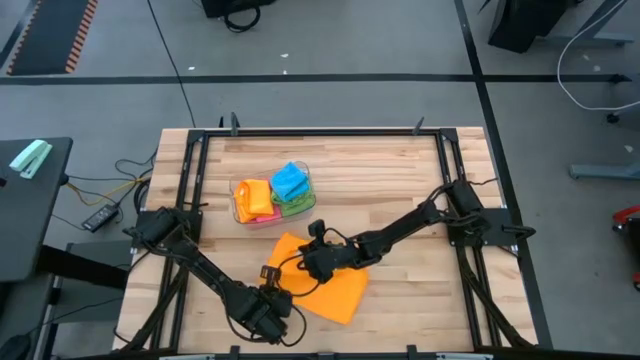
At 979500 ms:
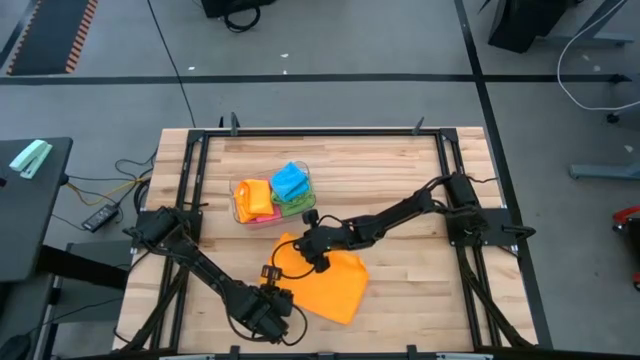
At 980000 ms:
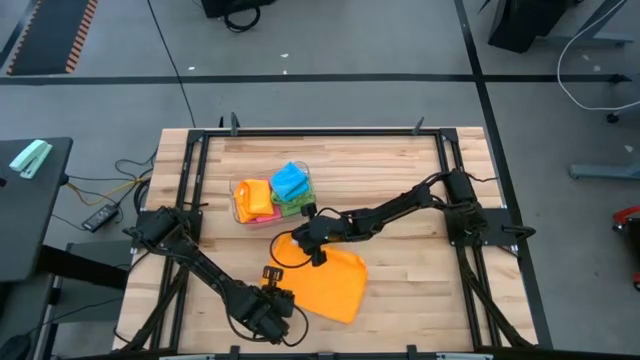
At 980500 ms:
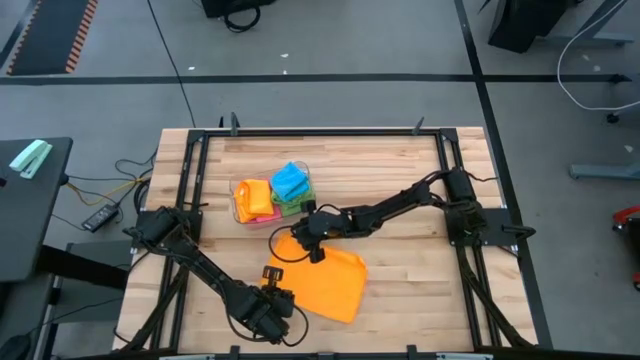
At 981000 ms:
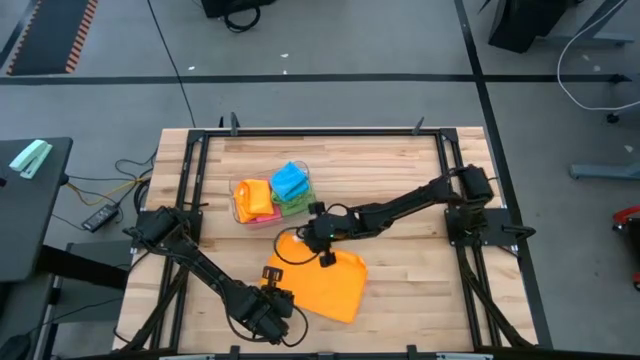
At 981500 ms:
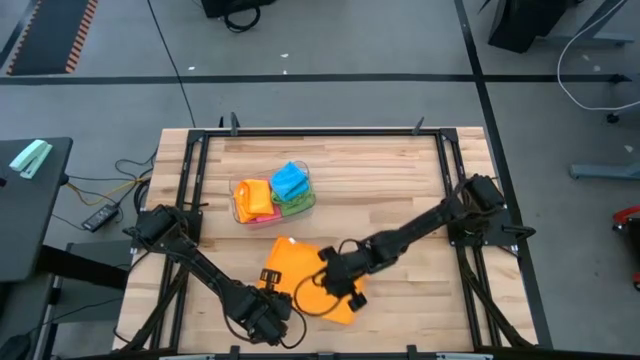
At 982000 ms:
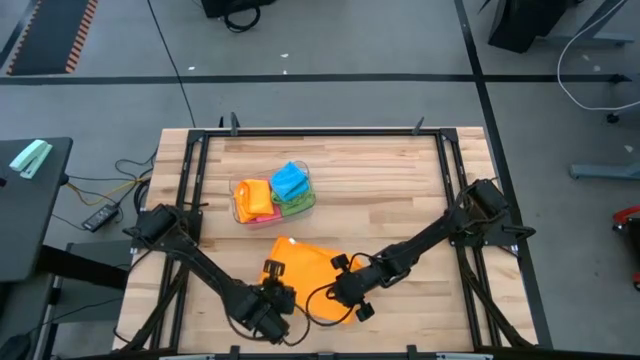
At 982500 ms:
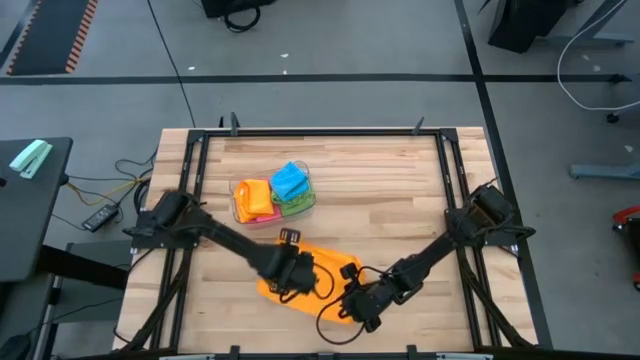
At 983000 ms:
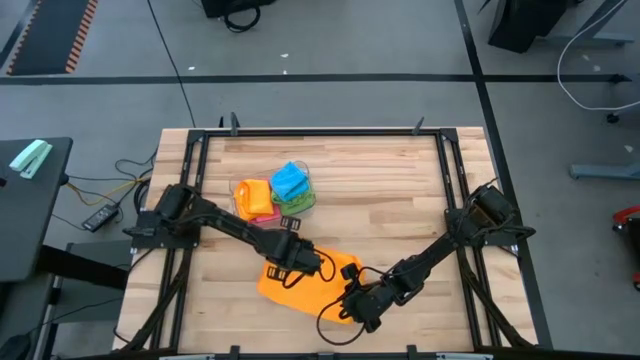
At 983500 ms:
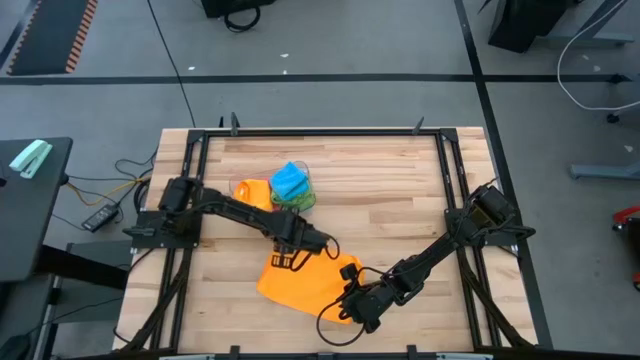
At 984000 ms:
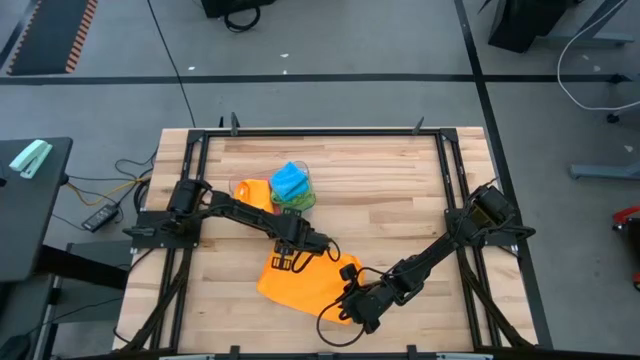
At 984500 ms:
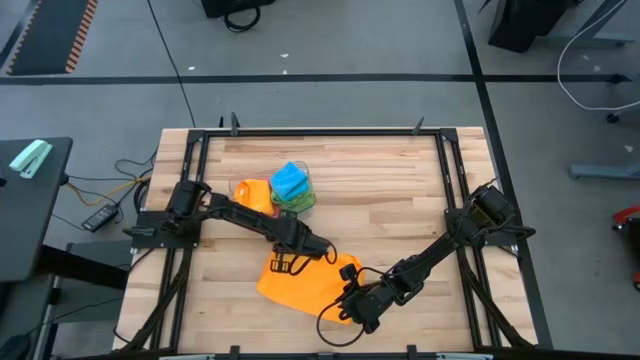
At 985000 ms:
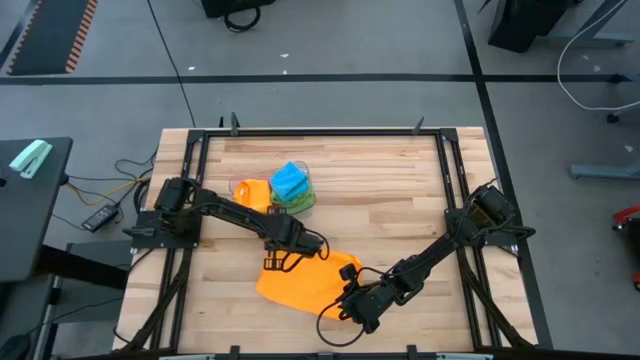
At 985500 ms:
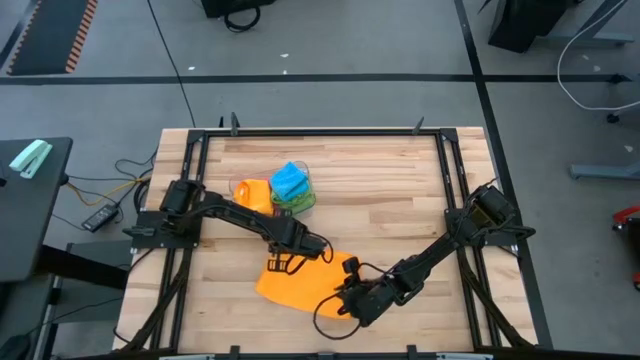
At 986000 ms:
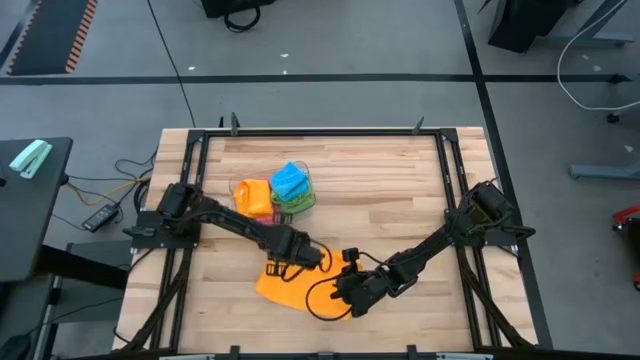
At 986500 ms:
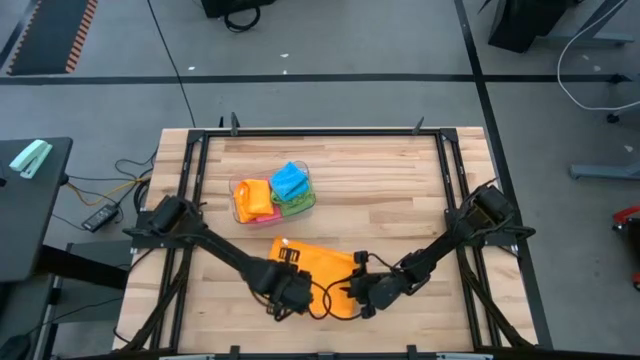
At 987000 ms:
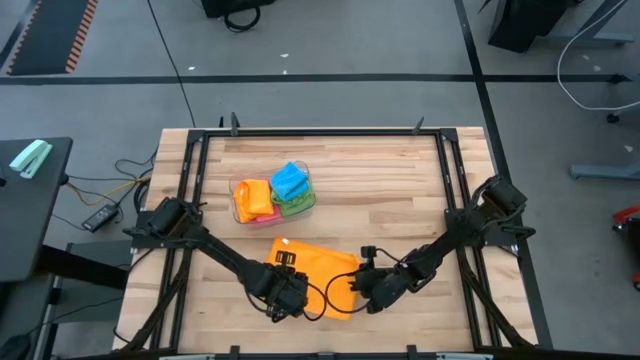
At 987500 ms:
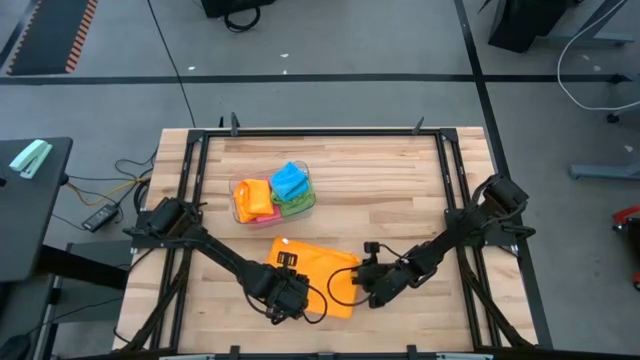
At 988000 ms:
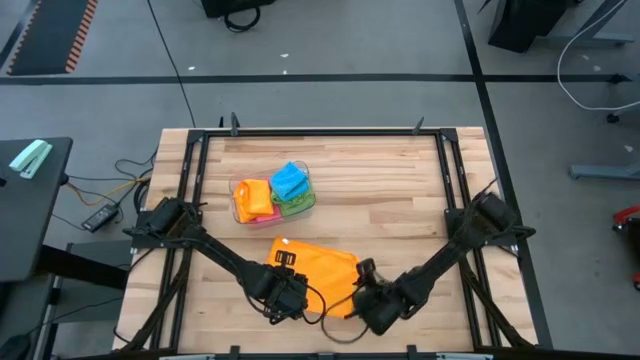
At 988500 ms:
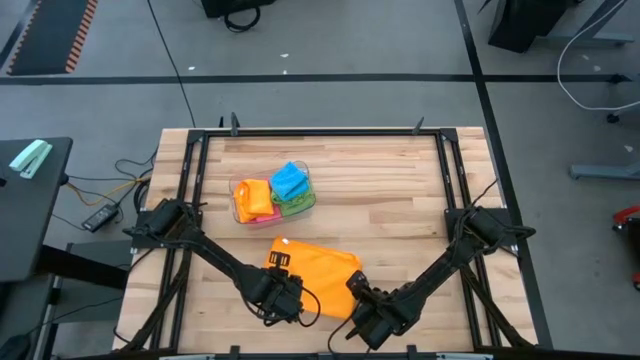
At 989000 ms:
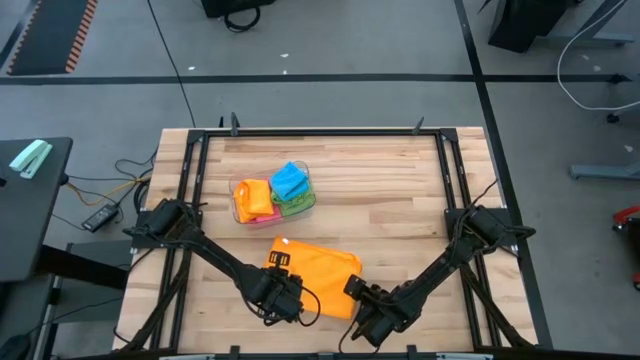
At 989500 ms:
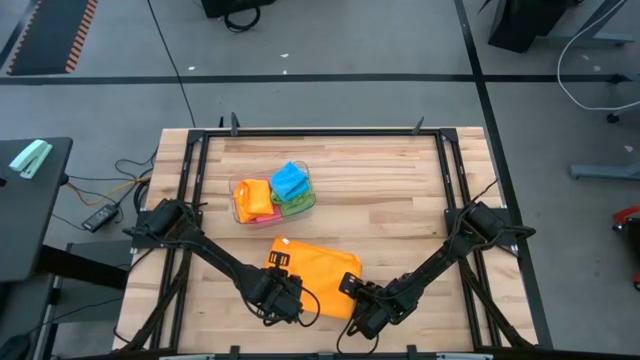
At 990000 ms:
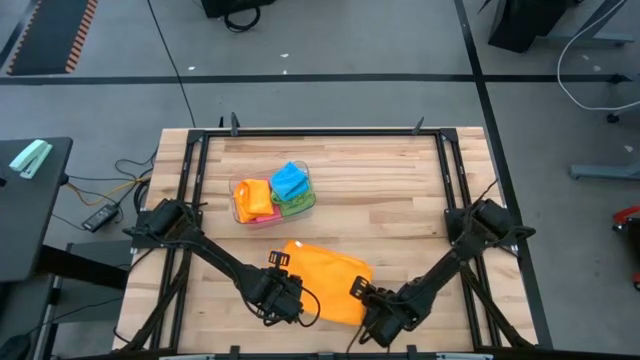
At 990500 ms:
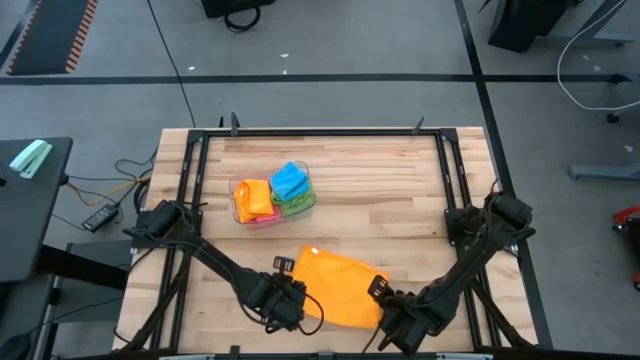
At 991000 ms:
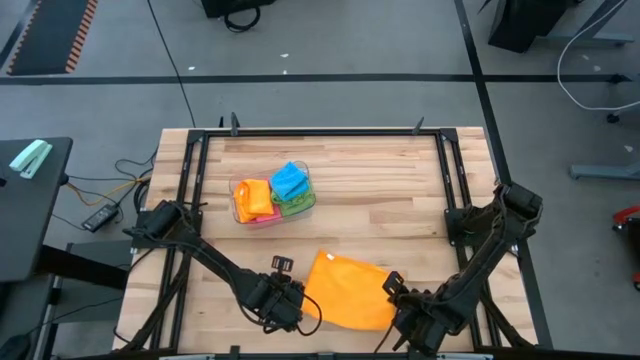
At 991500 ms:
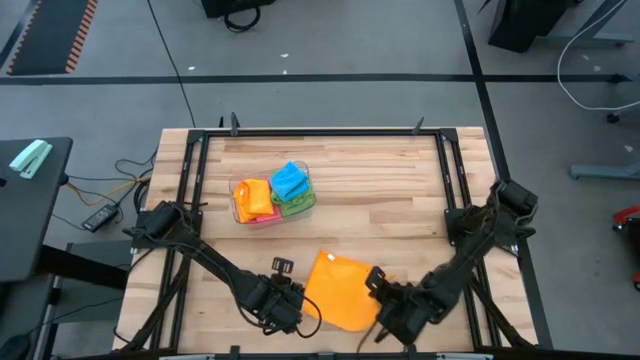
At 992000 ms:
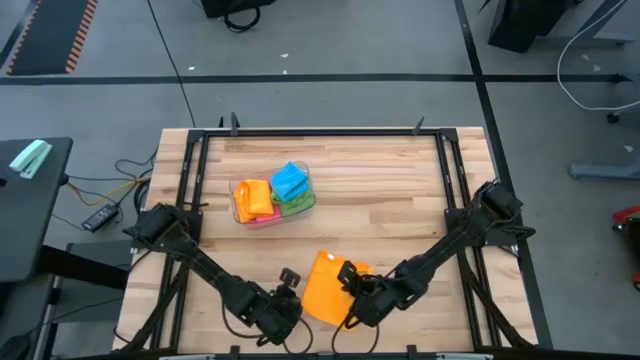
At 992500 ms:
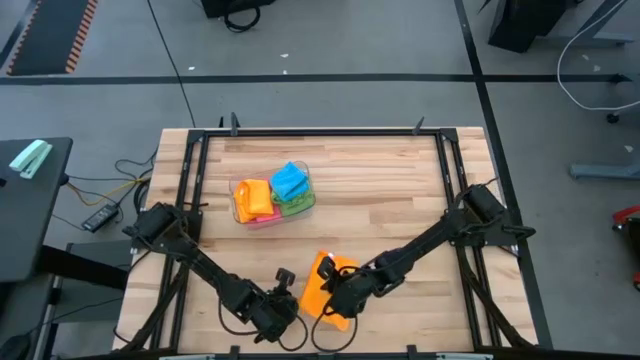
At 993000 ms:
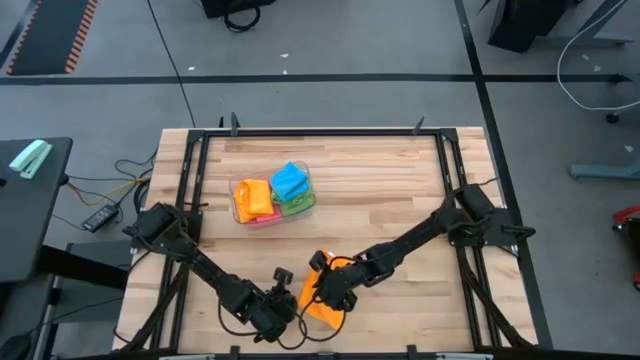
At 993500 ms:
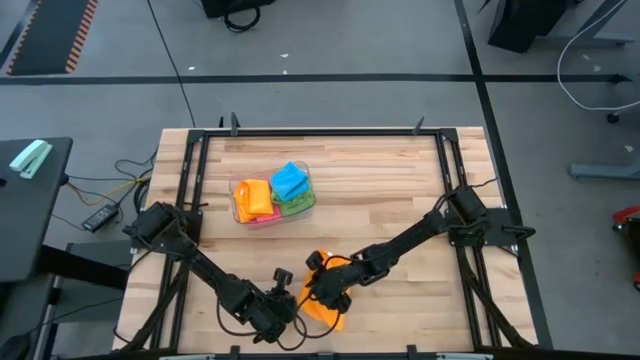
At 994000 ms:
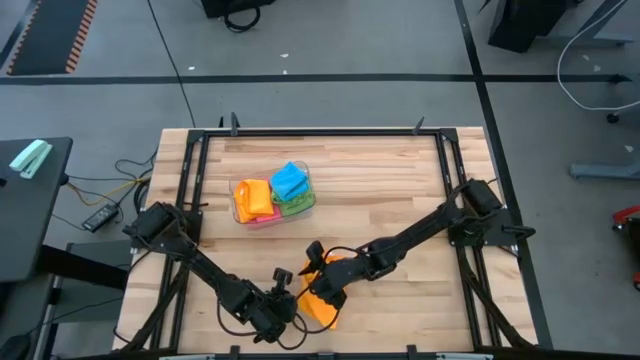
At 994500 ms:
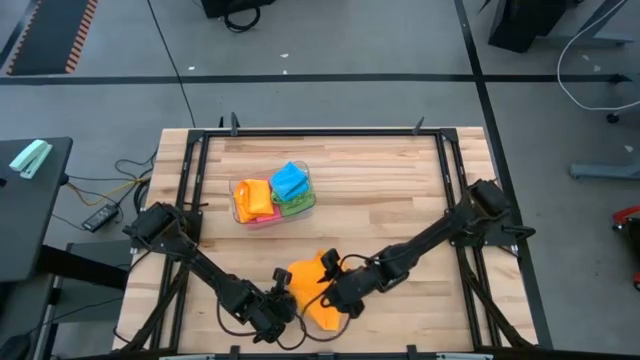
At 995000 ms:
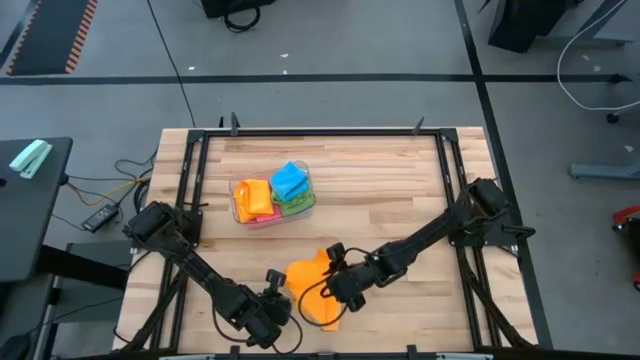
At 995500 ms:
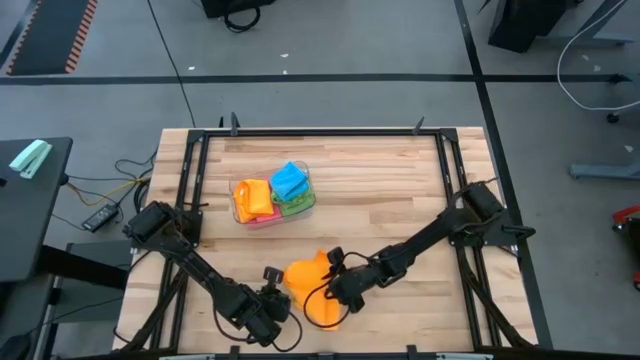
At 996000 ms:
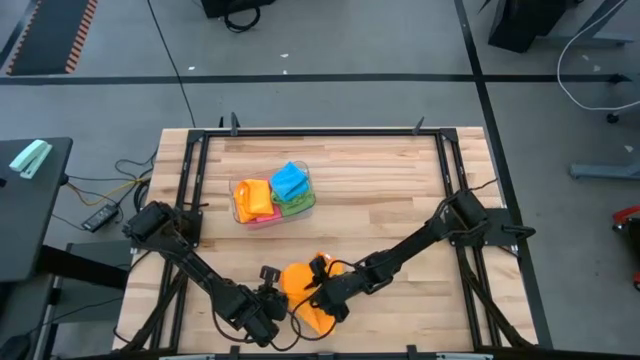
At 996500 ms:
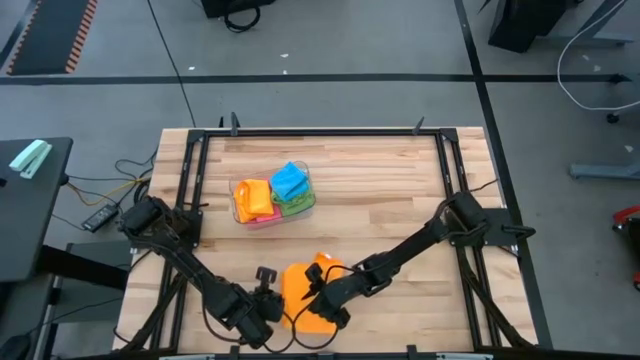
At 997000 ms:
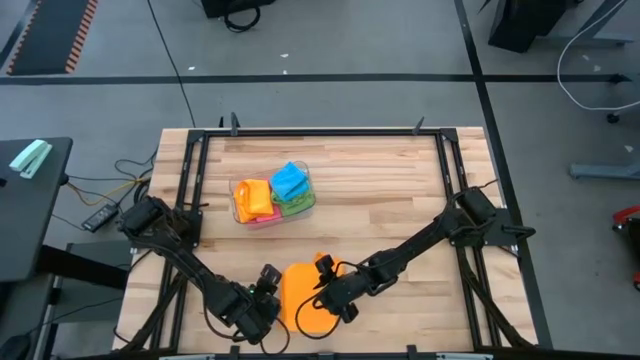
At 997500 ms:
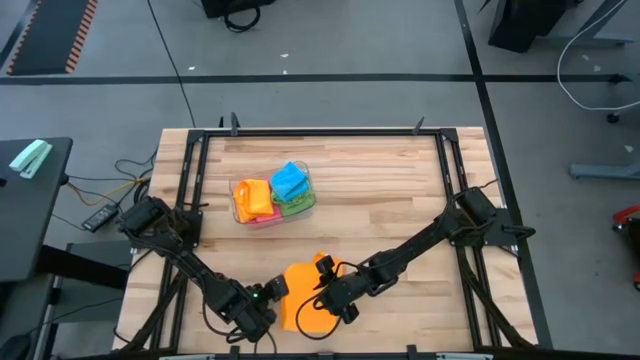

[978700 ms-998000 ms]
Task: Fold microfiber towels
Fold the yellow microfiber towel

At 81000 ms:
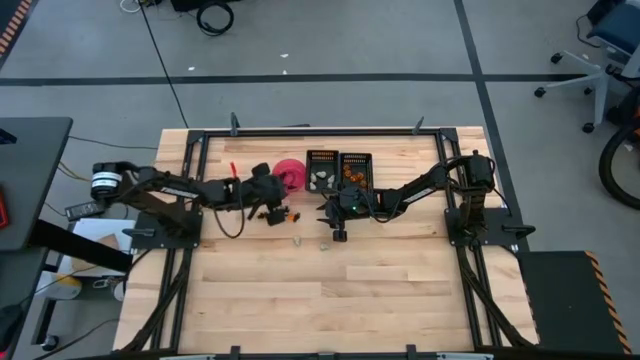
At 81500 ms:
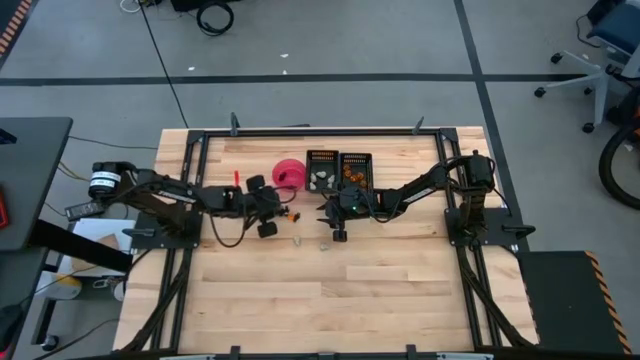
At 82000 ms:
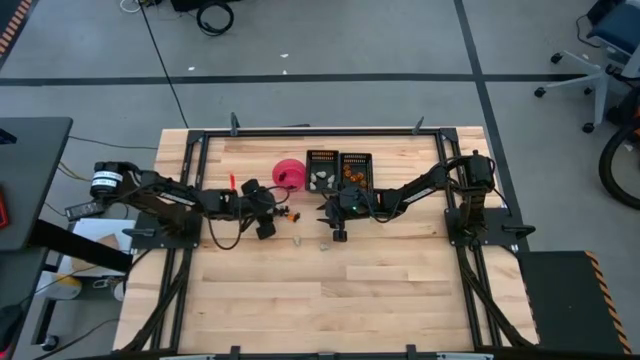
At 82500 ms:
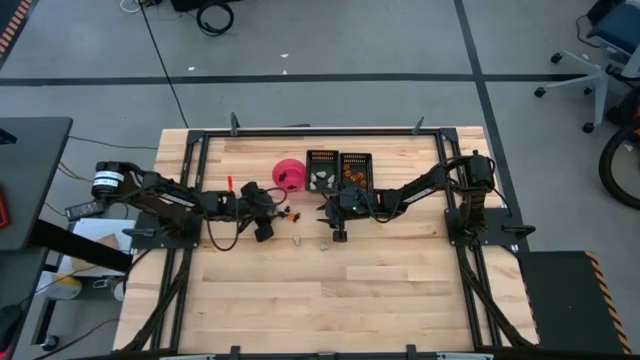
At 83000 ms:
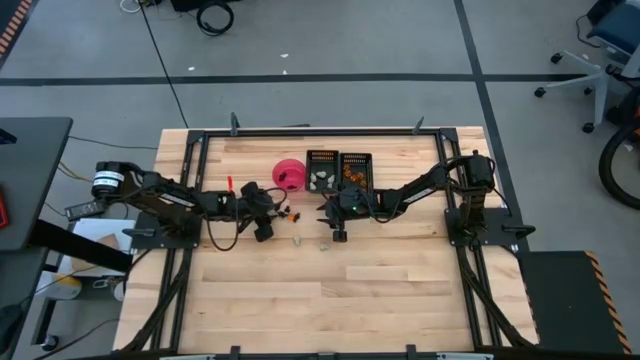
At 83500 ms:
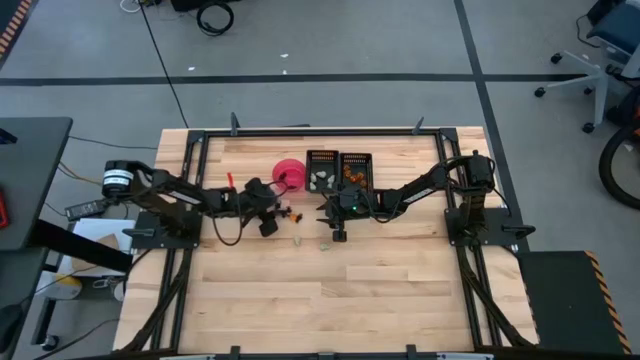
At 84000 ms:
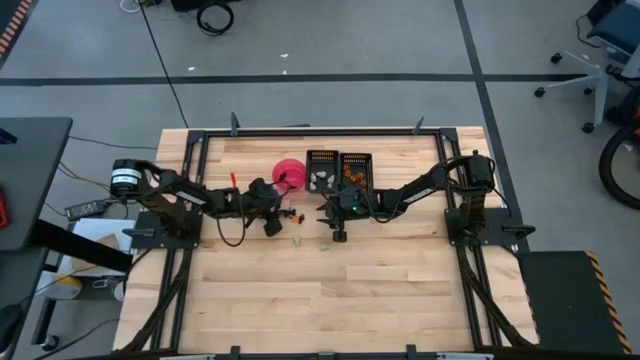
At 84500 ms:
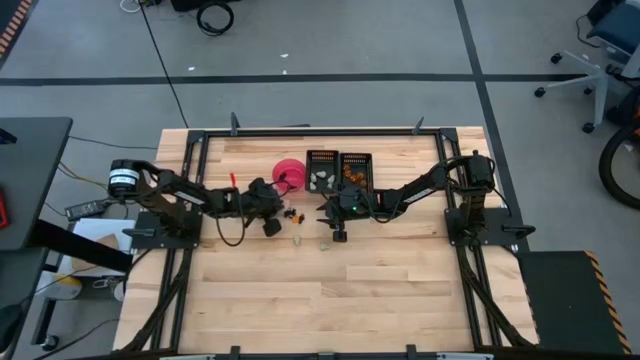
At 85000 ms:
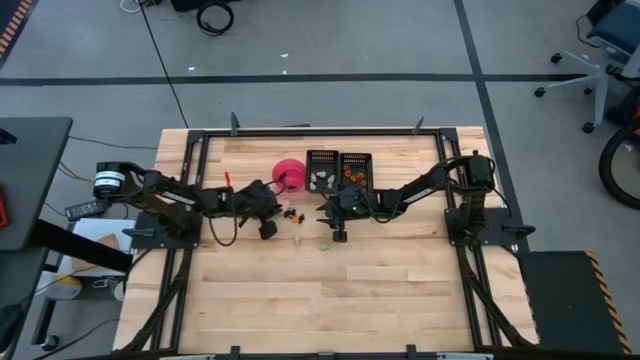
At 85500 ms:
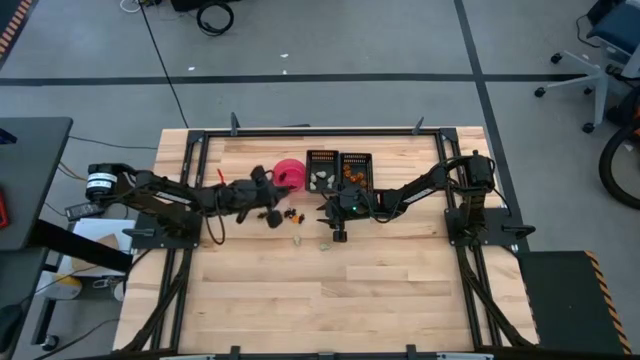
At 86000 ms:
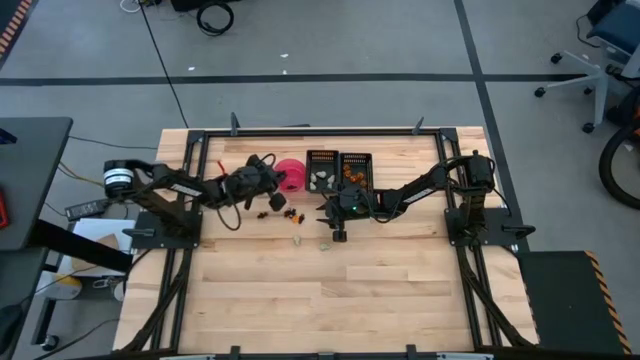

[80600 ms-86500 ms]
Task: Sort Halloween decoration
Put the black skeleton toy into the red bowl
